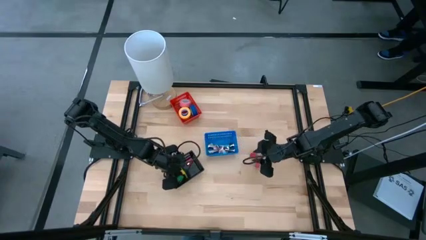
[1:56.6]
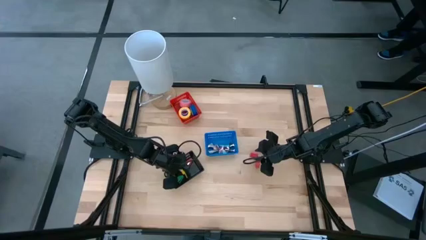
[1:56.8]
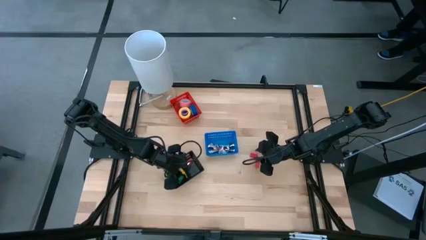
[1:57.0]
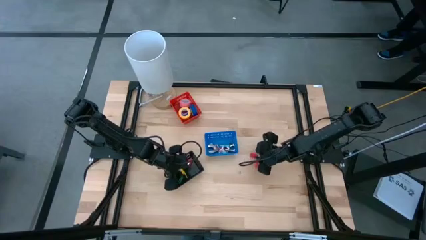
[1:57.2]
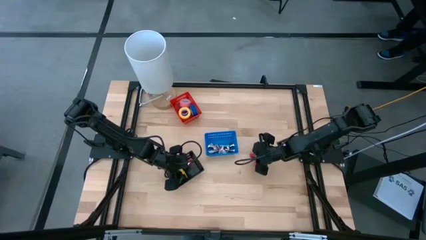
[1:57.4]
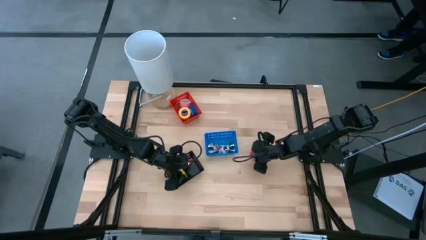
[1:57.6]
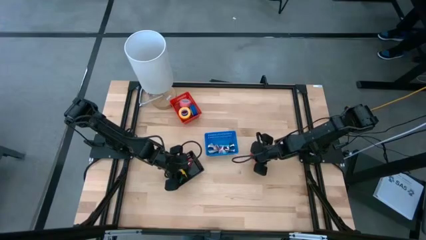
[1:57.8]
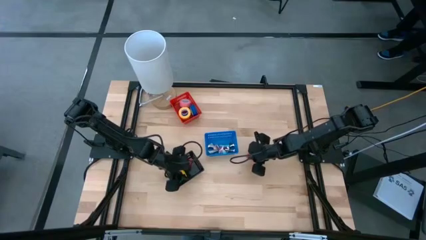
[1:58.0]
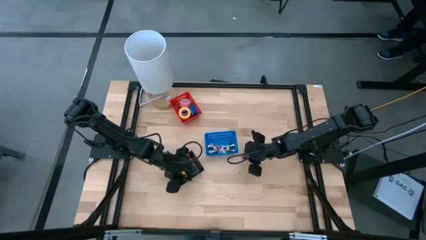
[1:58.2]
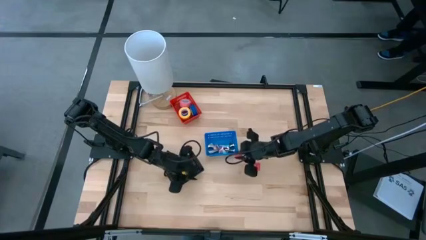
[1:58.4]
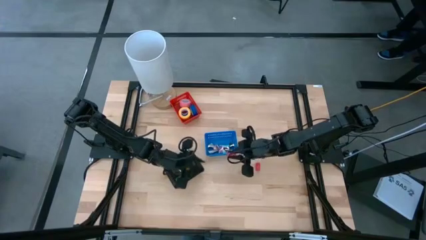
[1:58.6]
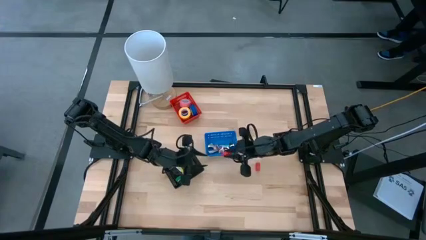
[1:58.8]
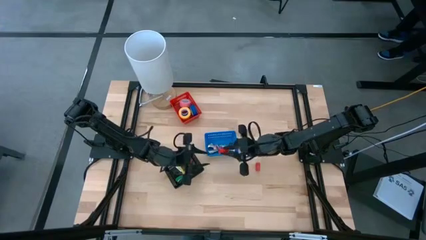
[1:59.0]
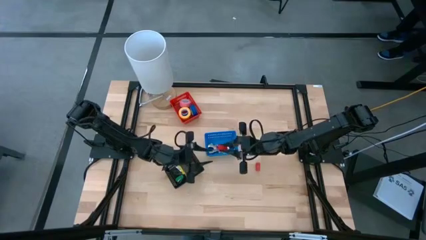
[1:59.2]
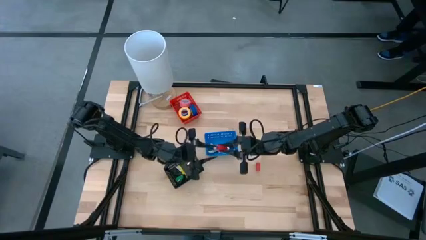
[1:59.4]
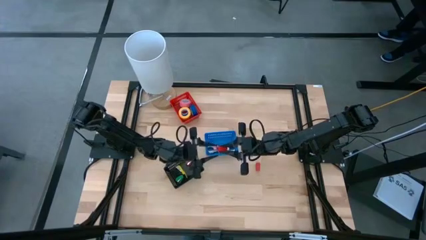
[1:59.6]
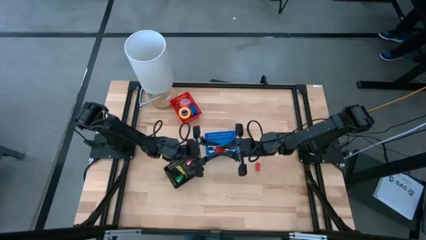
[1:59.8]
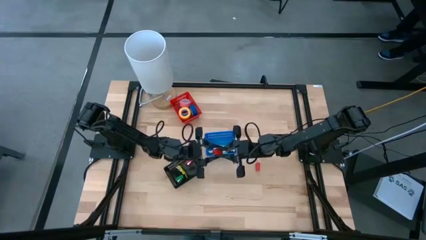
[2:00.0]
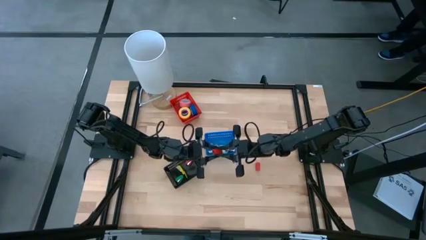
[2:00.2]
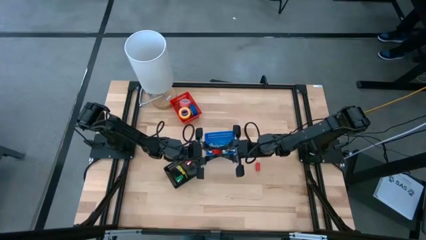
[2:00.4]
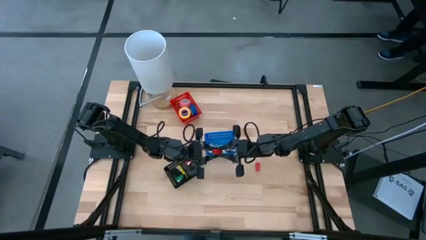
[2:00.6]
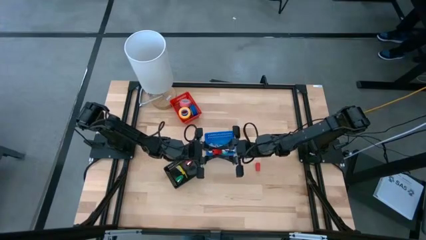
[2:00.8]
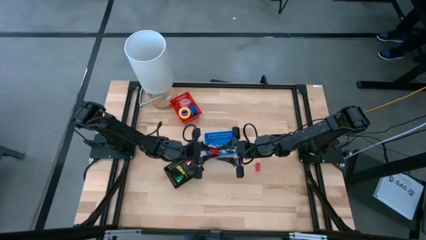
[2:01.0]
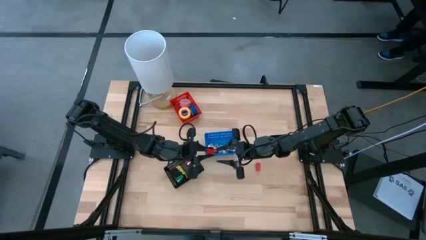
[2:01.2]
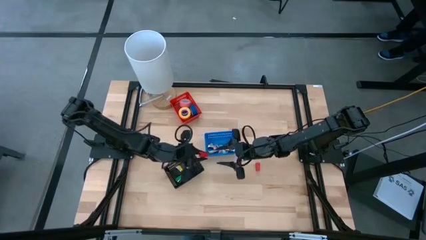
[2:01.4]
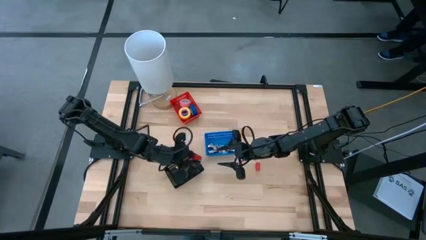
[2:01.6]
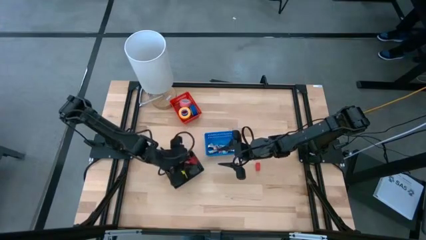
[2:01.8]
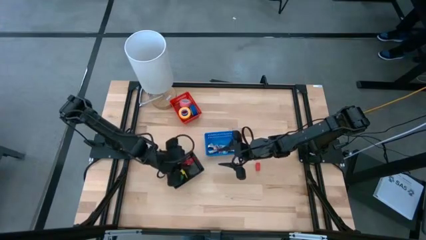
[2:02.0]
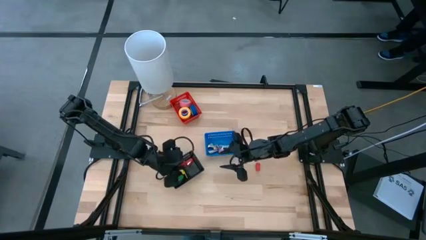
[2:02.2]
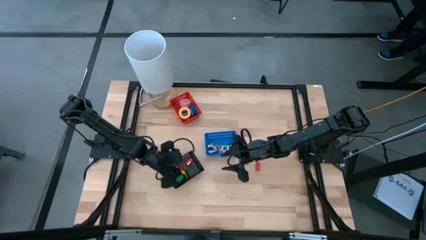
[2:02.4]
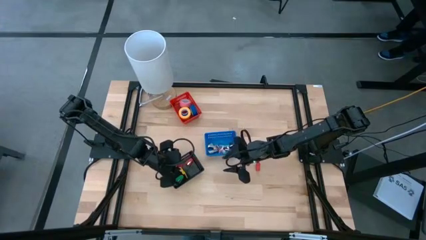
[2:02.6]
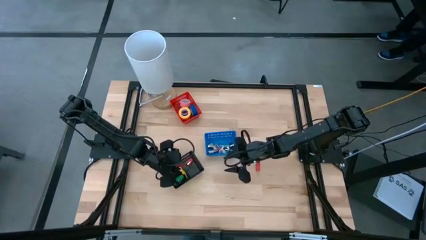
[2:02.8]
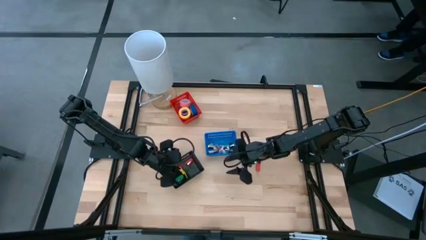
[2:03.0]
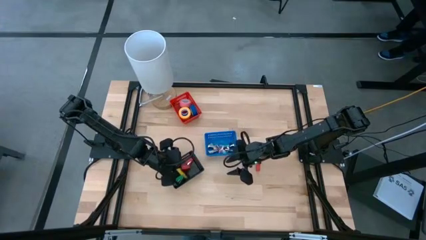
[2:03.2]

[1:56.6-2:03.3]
Task: Pick and place Stapler, Stapler remover, tape
Put the top red stapler into the black basket

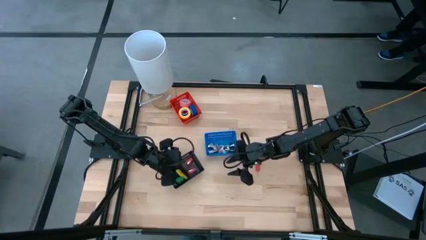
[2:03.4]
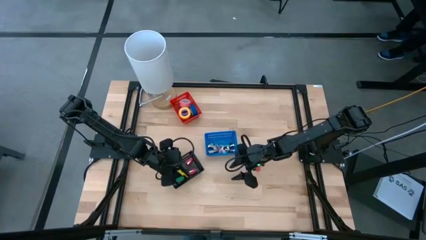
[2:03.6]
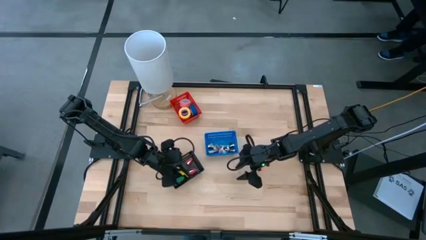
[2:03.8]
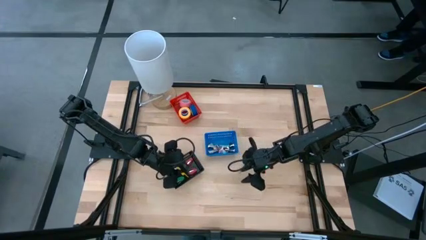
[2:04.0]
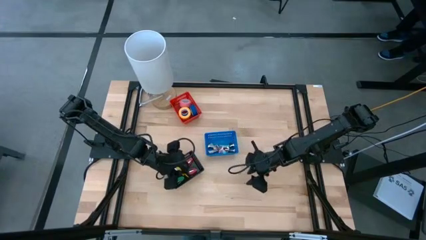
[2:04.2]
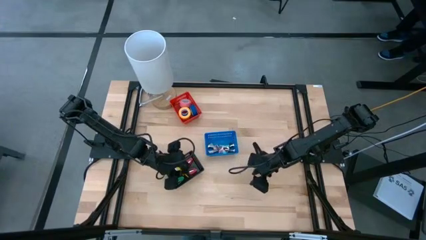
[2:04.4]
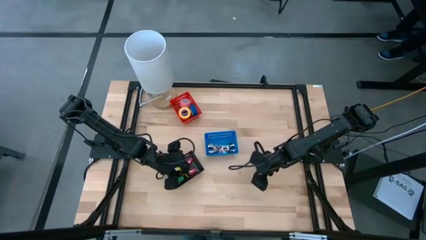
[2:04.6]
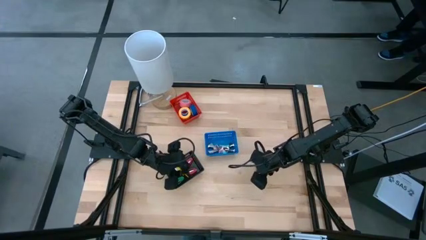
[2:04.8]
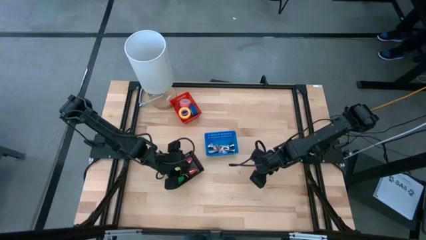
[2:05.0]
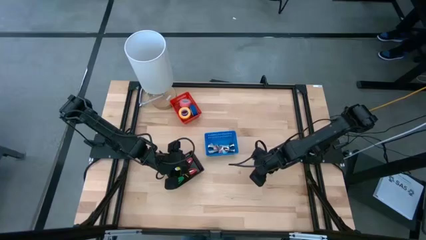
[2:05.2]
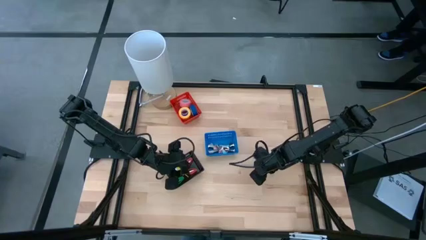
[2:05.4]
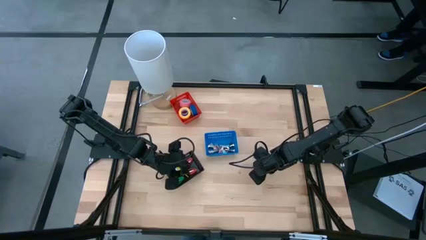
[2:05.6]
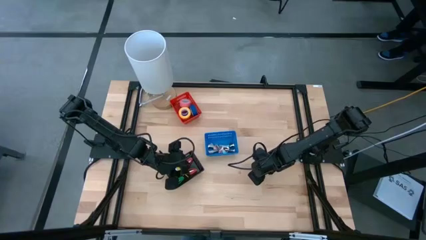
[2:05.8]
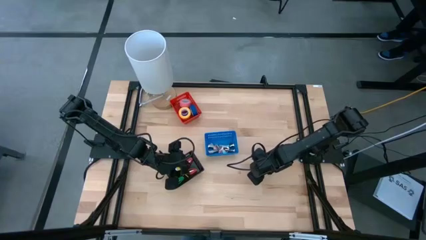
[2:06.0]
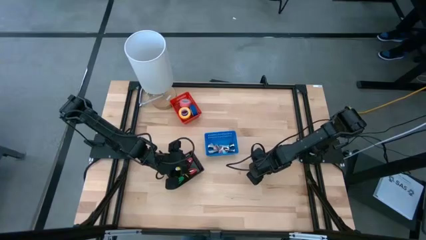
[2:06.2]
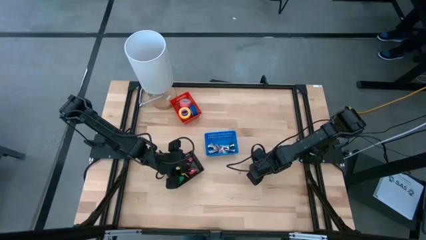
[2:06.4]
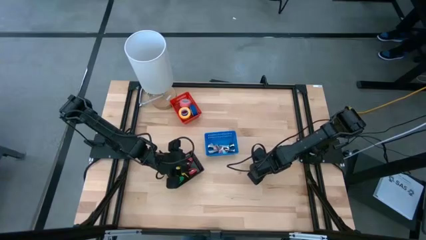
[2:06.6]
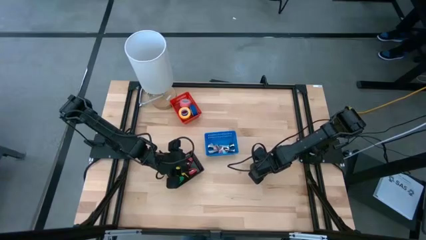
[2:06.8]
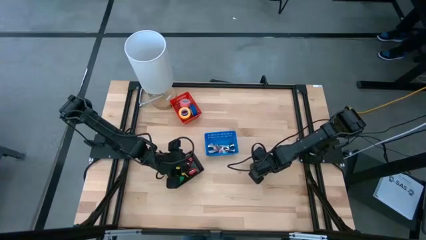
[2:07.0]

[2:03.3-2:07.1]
Put the red stapler into the black basket

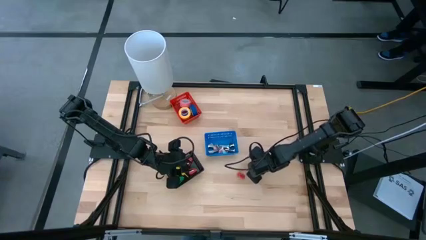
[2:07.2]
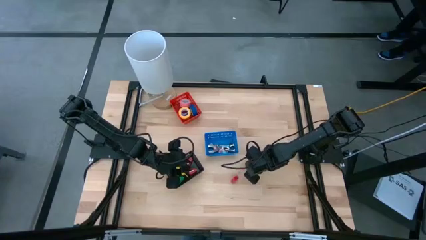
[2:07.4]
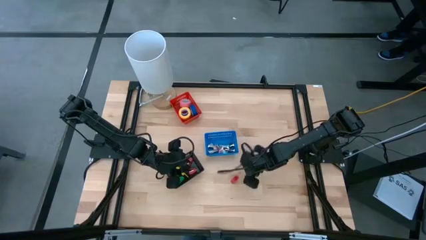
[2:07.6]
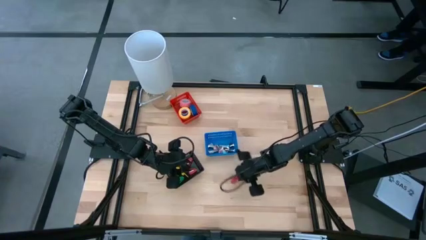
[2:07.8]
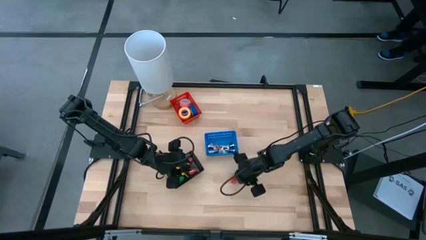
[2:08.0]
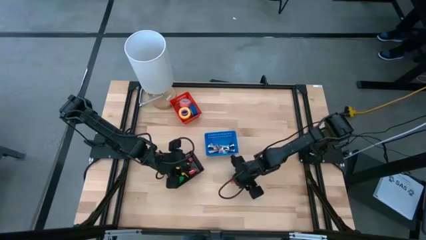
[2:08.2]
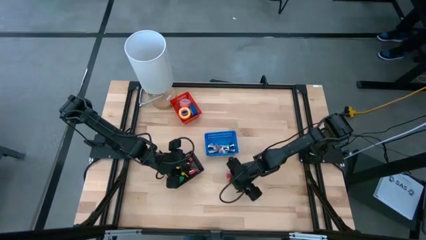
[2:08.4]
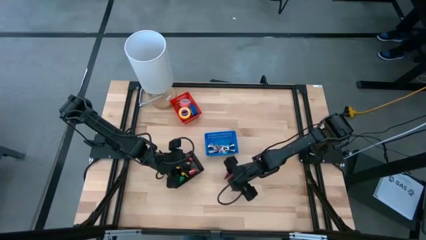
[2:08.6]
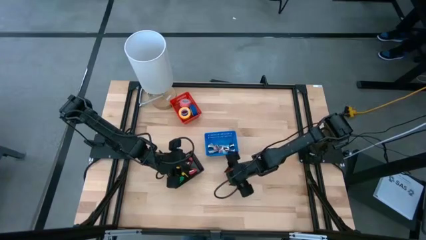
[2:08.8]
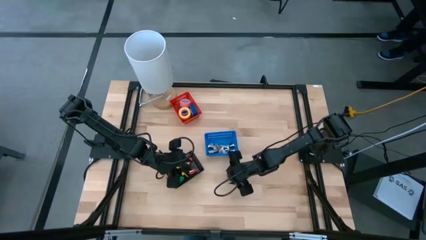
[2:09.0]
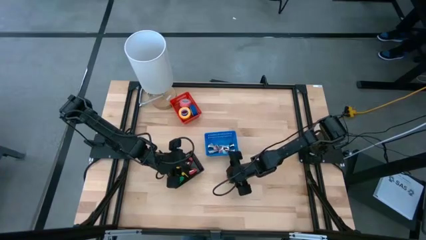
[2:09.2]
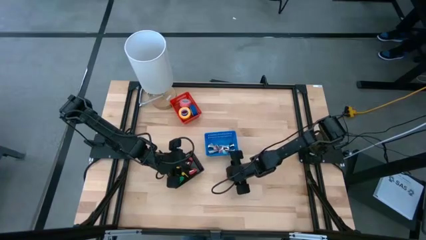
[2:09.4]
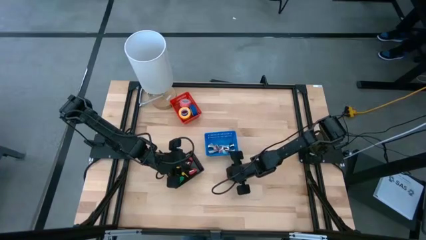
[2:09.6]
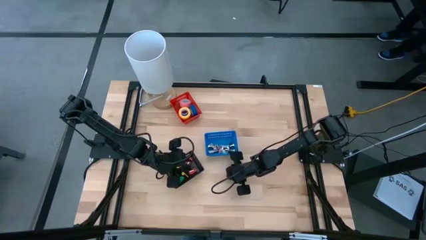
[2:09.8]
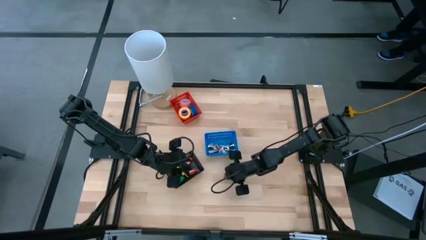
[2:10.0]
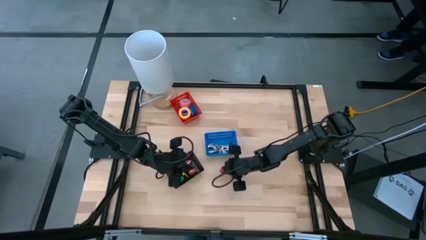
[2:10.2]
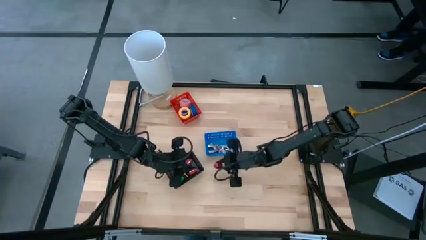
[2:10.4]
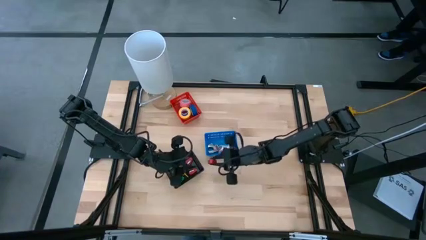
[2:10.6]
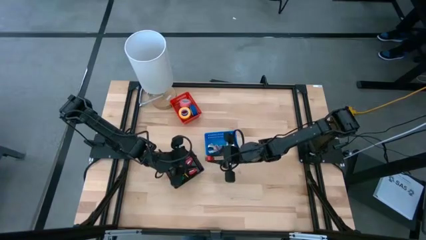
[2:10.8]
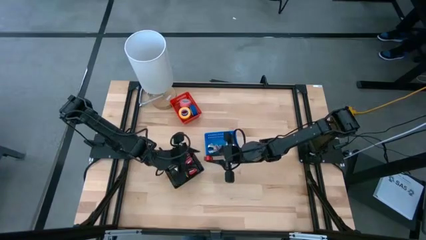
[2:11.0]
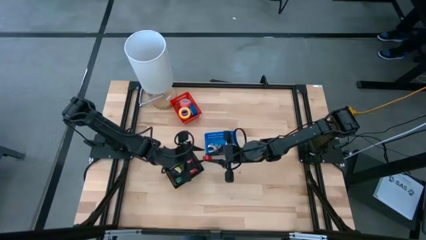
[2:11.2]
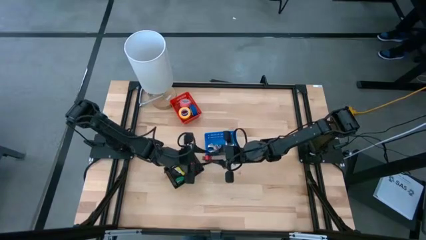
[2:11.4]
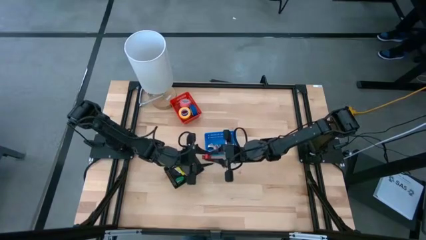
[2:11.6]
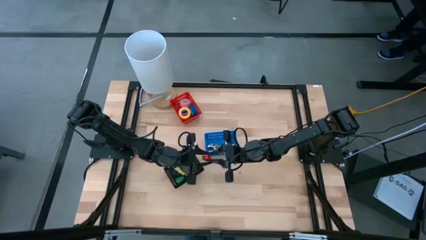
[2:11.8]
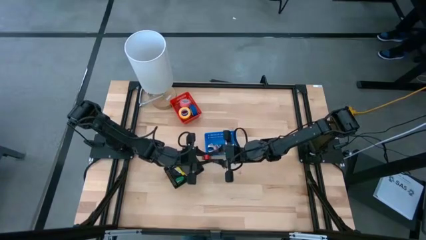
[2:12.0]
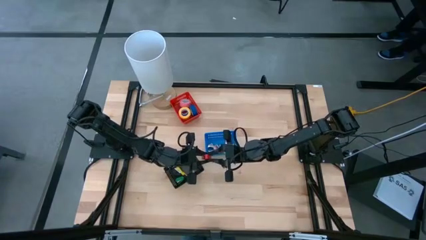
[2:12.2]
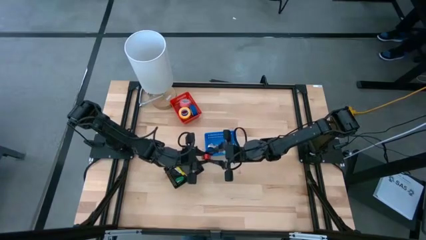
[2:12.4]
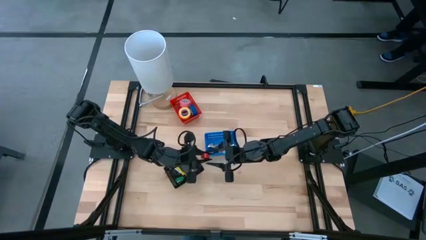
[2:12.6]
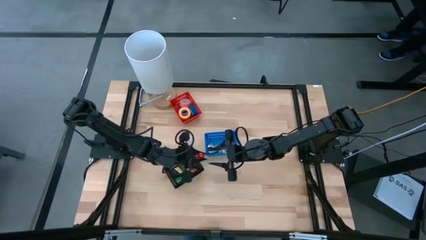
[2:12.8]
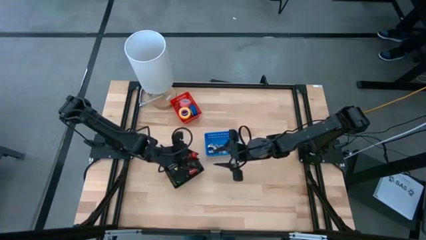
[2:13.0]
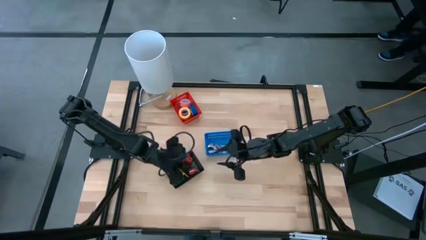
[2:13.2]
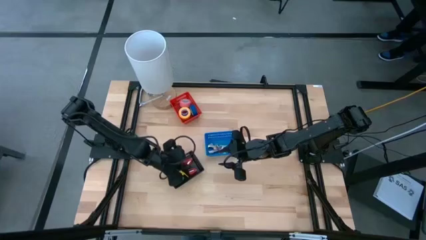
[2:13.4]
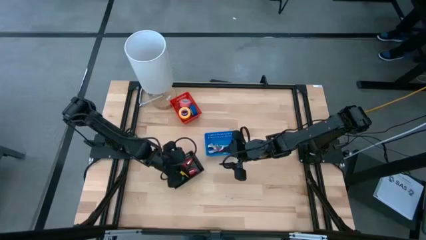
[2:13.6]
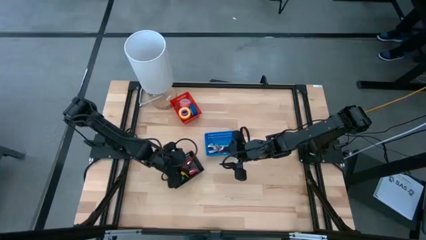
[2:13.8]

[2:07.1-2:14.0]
Put the red stapler into the black basket
